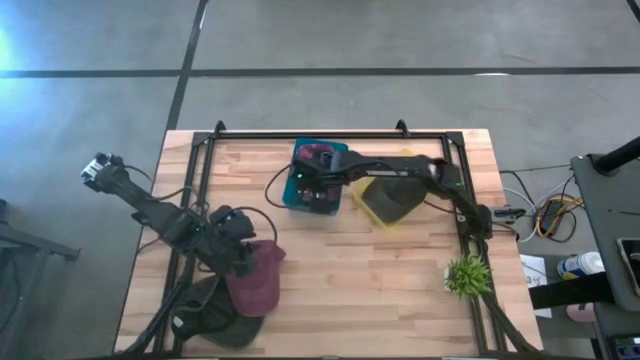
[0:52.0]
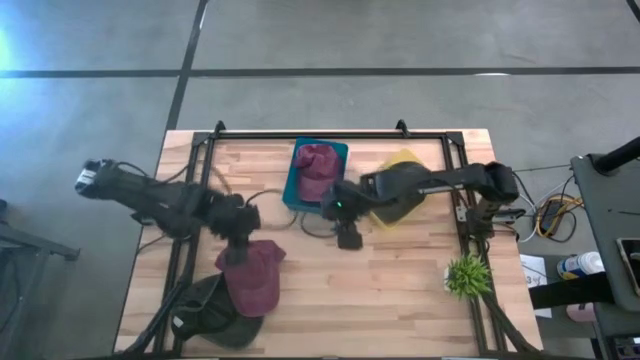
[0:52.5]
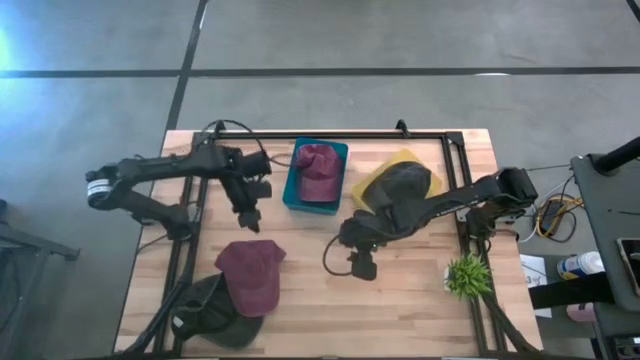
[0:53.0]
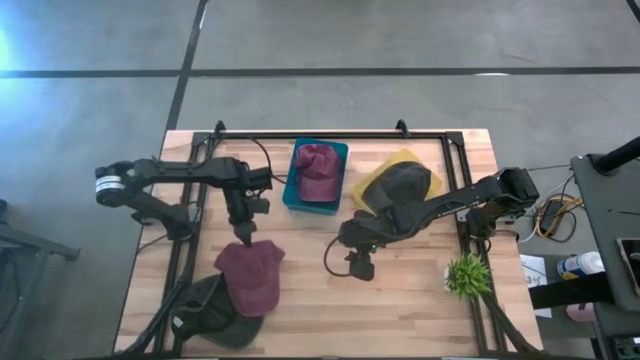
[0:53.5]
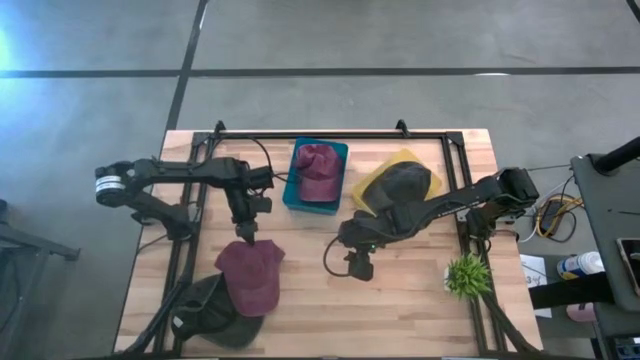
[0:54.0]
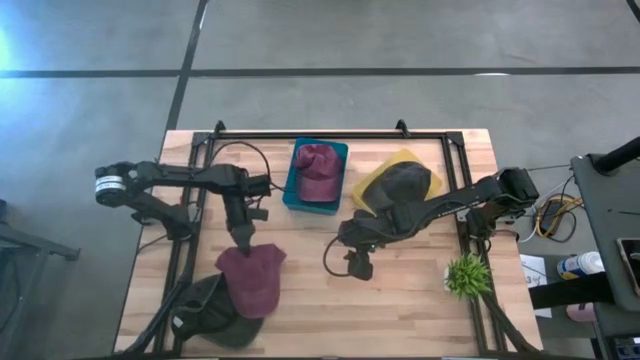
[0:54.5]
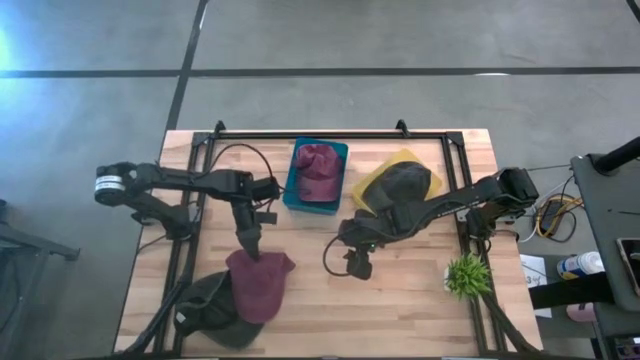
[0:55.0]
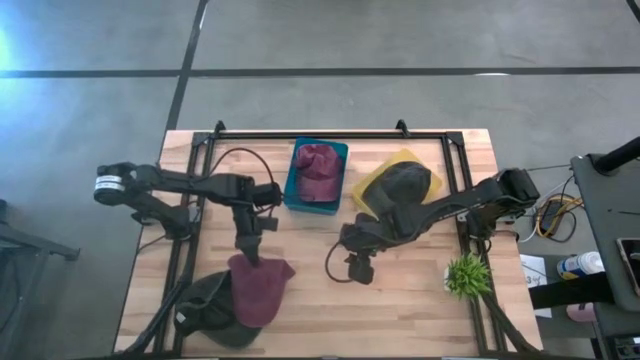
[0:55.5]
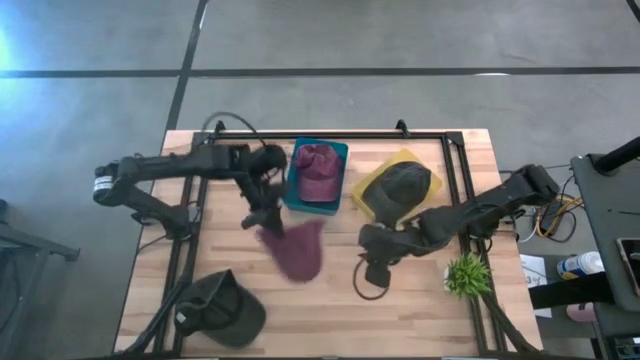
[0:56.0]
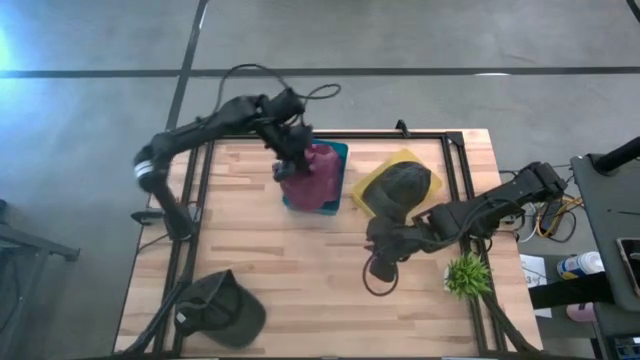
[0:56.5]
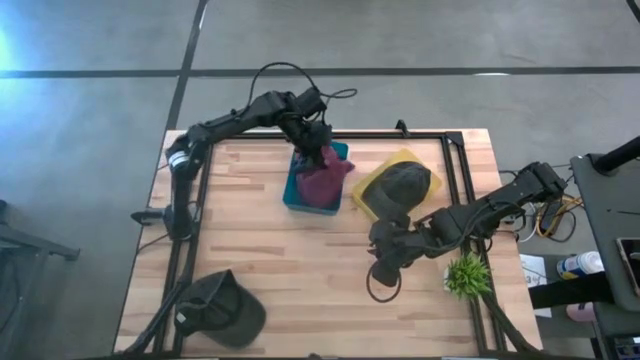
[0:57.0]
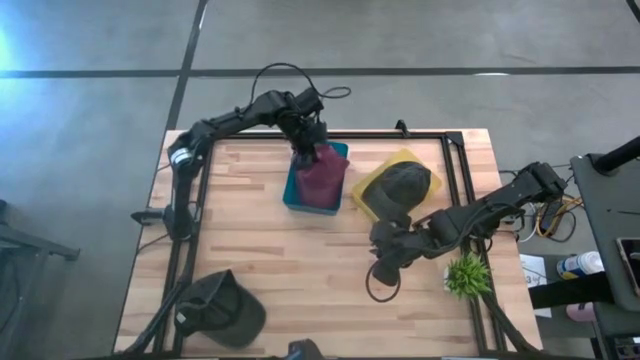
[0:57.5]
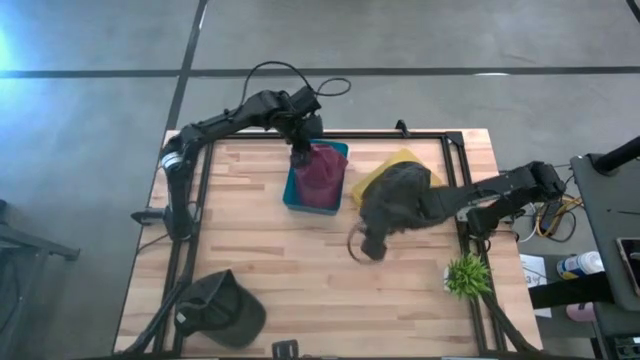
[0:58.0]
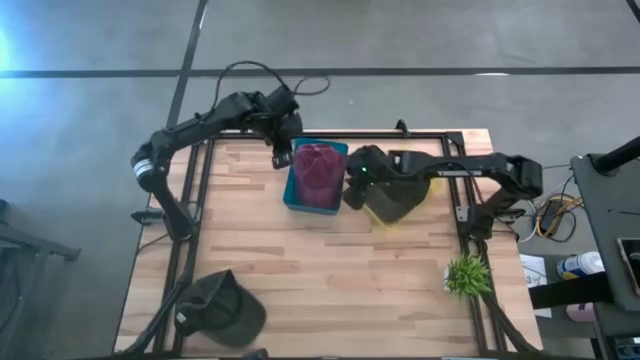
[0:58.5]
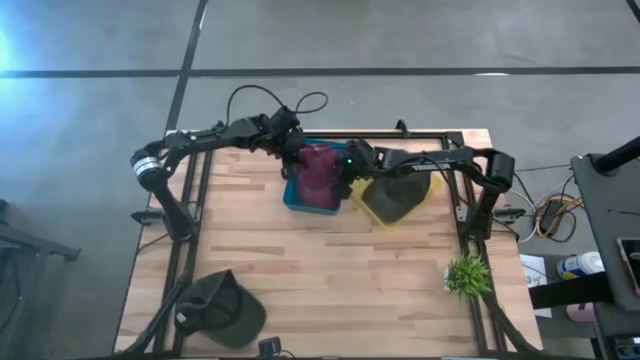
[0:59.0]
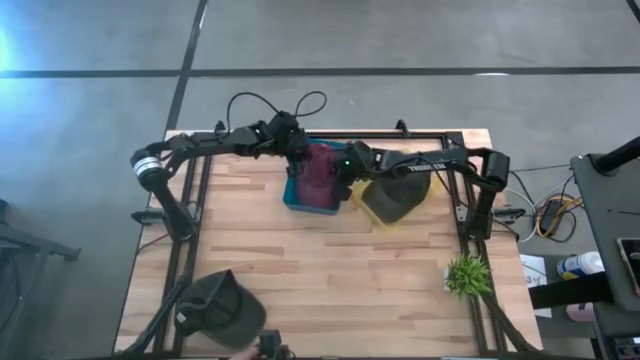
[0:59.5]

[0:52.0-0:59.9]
Task: Pick & Place hat
Put the red cap into the blue bin

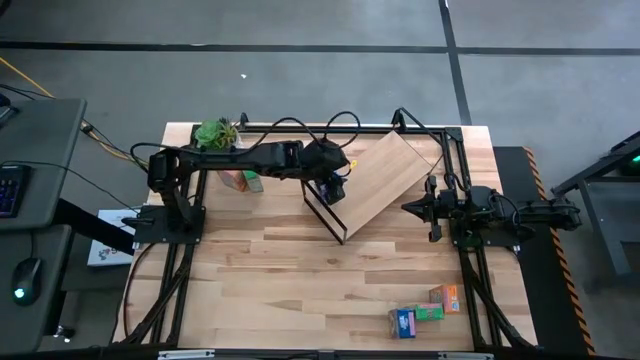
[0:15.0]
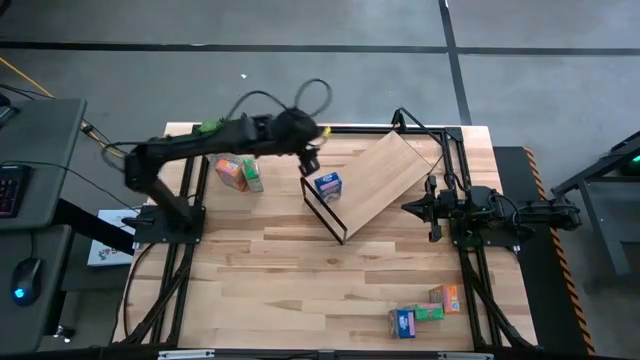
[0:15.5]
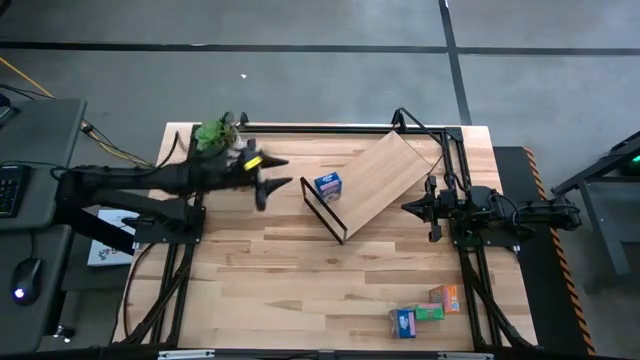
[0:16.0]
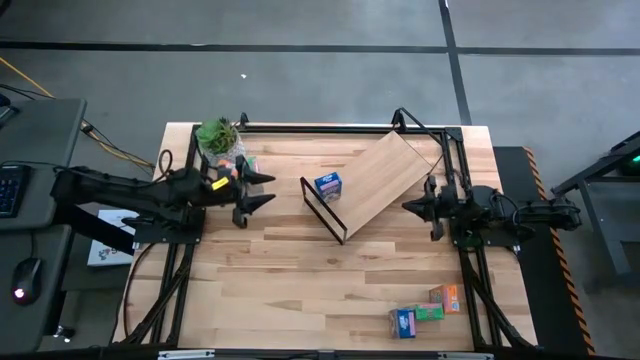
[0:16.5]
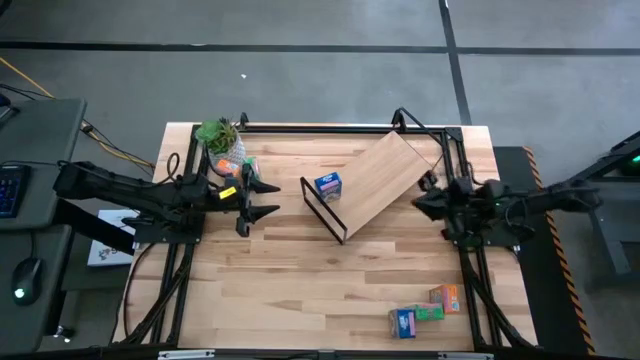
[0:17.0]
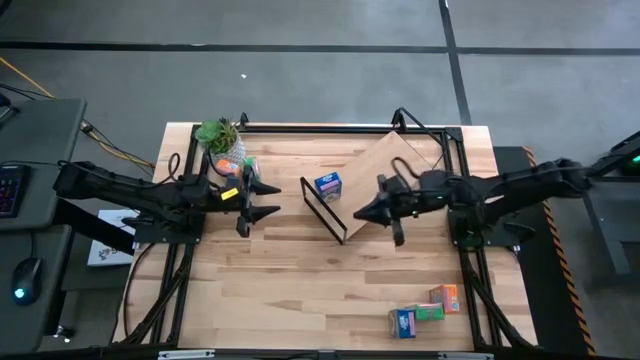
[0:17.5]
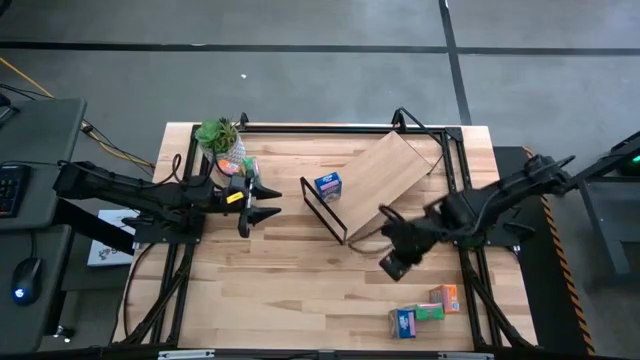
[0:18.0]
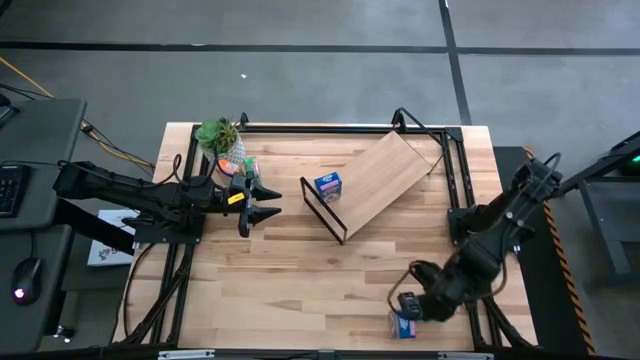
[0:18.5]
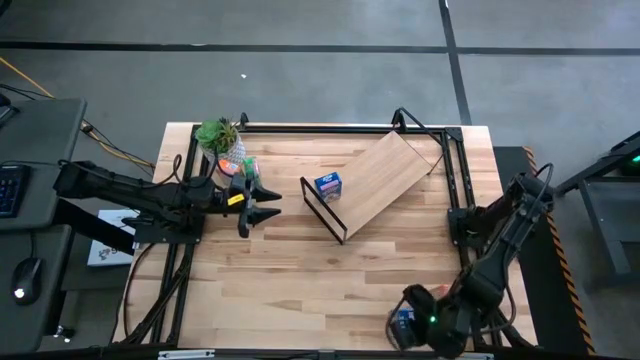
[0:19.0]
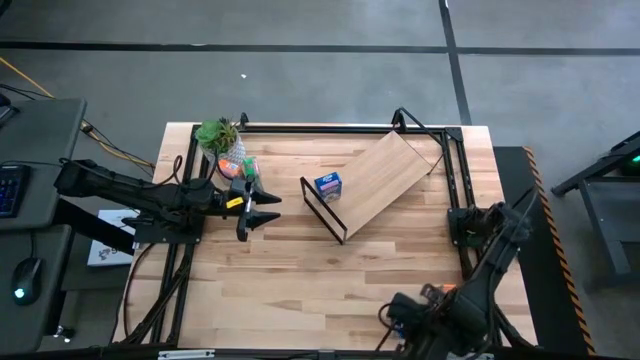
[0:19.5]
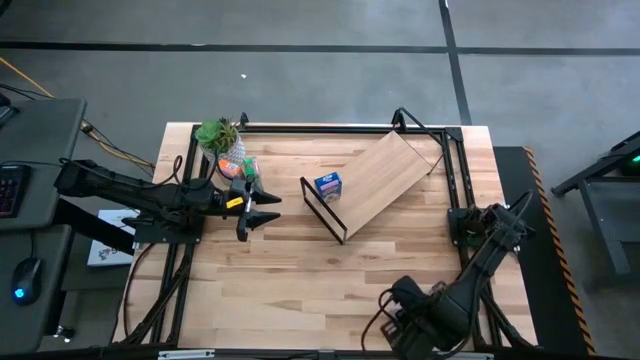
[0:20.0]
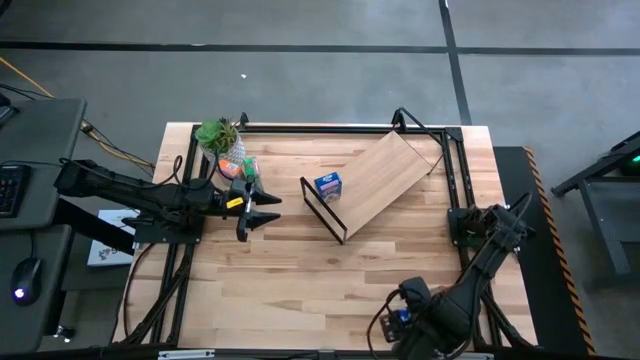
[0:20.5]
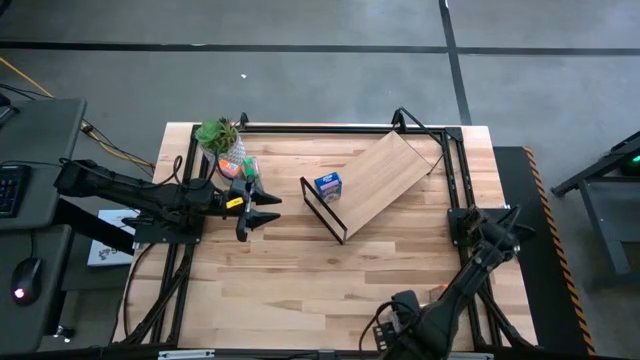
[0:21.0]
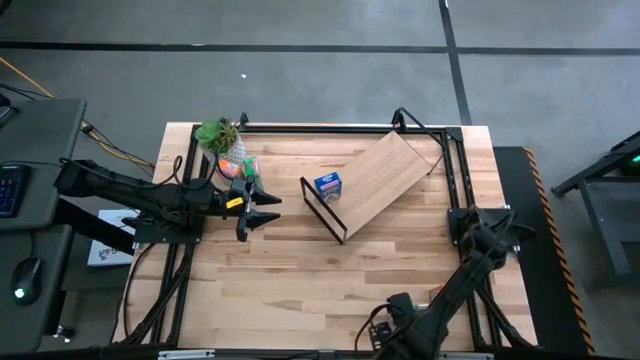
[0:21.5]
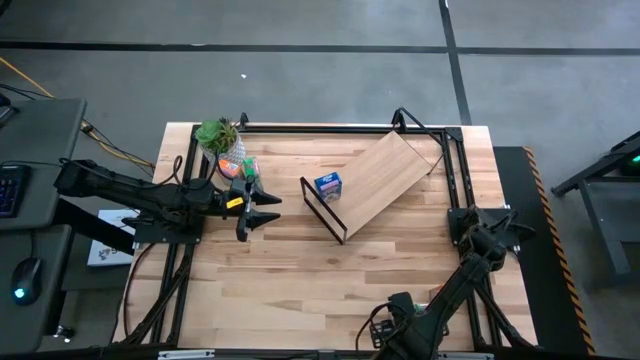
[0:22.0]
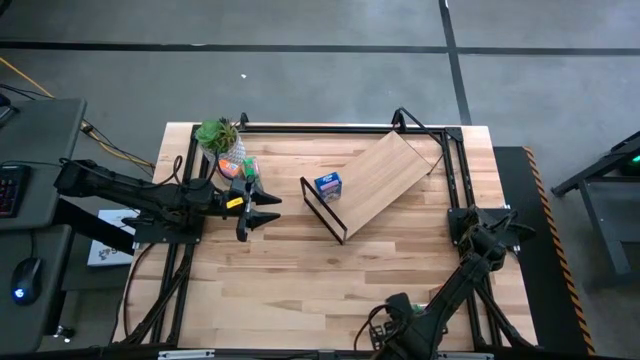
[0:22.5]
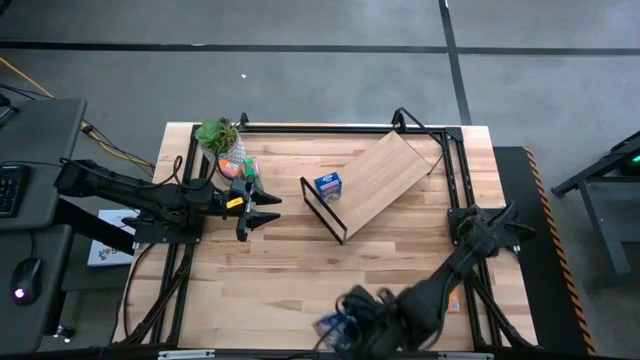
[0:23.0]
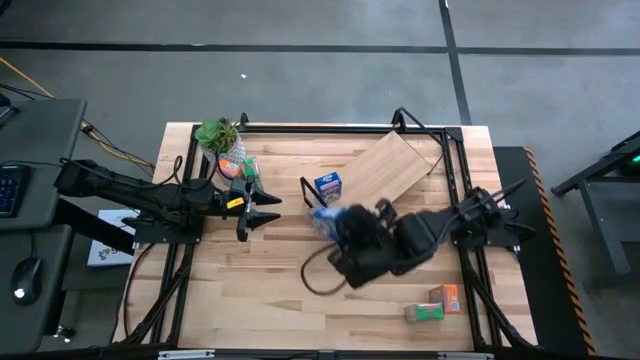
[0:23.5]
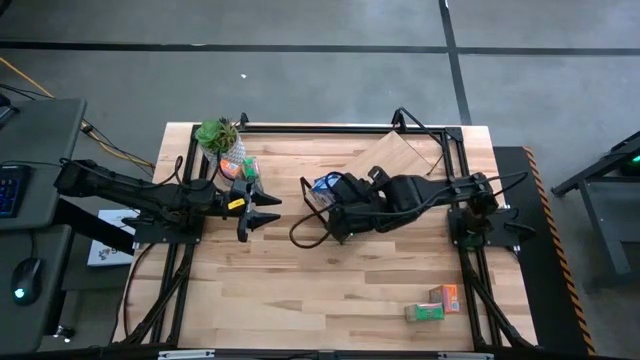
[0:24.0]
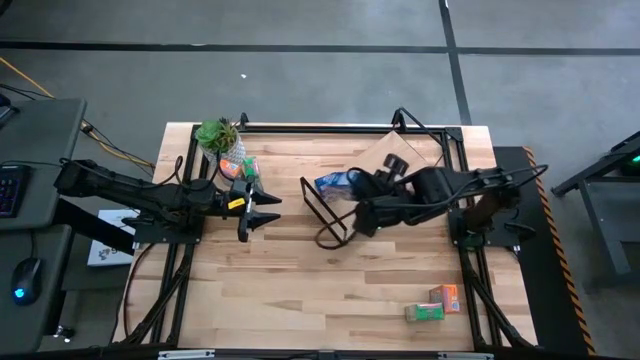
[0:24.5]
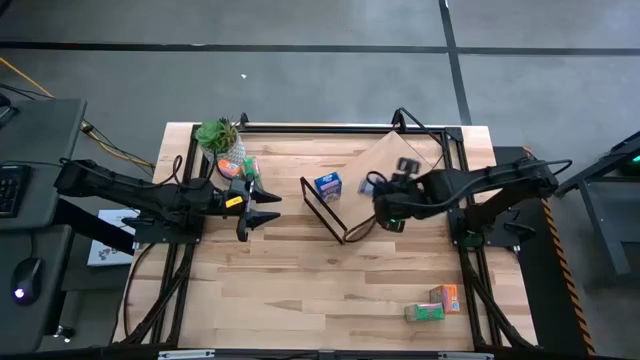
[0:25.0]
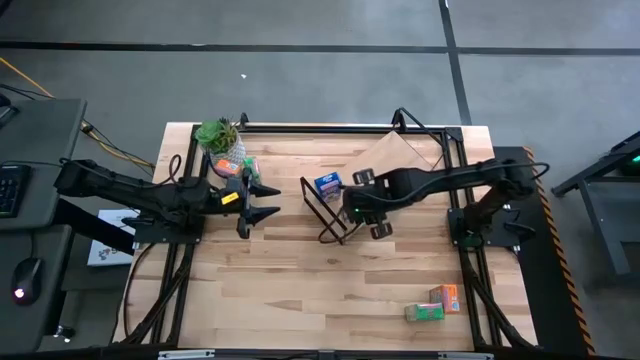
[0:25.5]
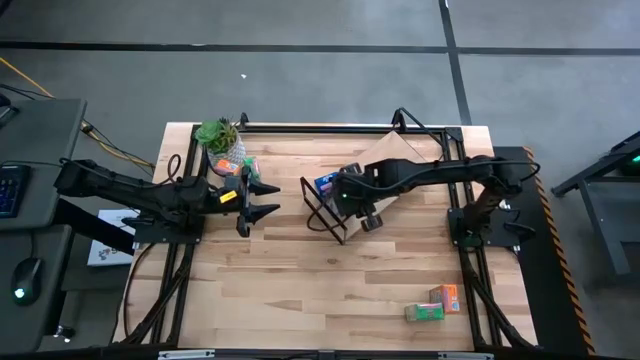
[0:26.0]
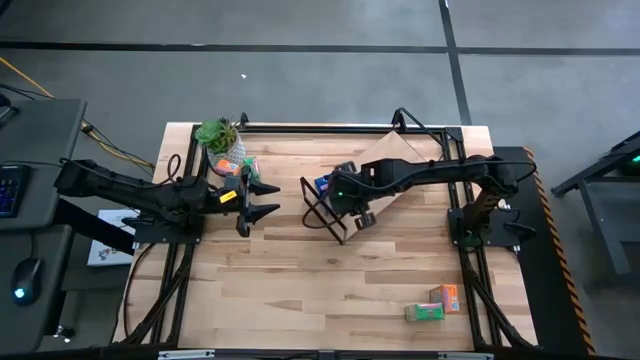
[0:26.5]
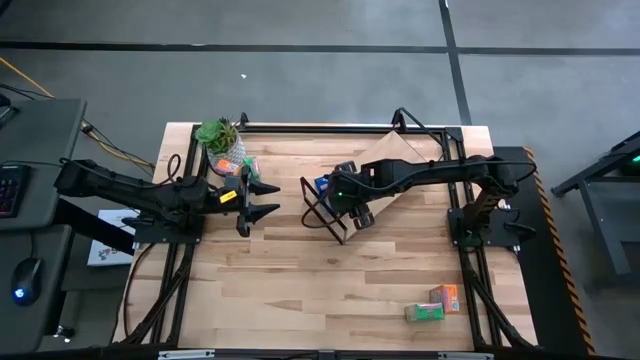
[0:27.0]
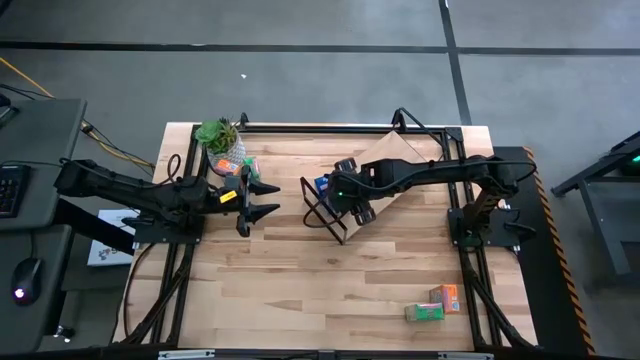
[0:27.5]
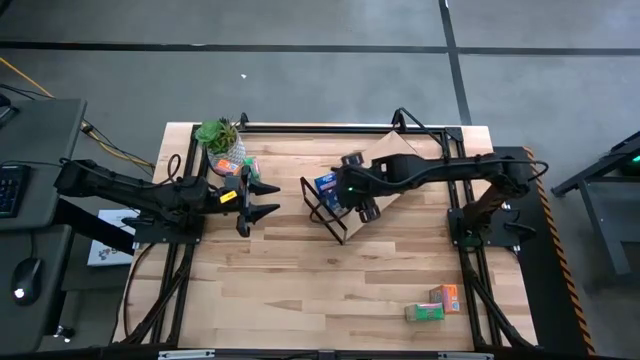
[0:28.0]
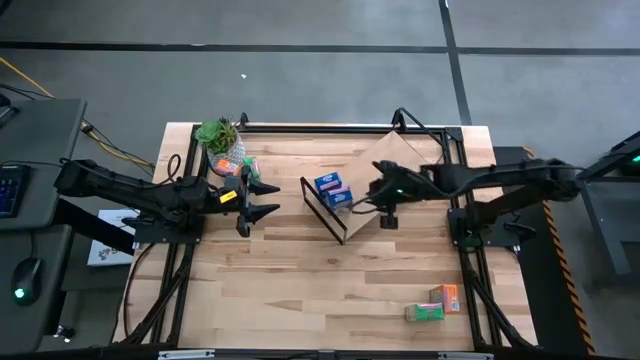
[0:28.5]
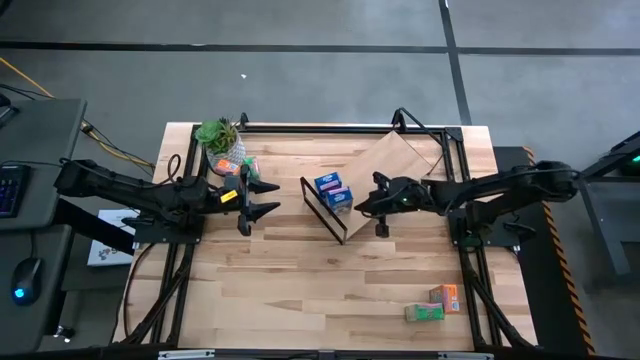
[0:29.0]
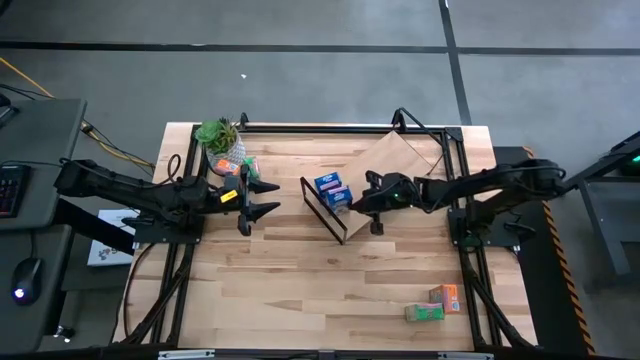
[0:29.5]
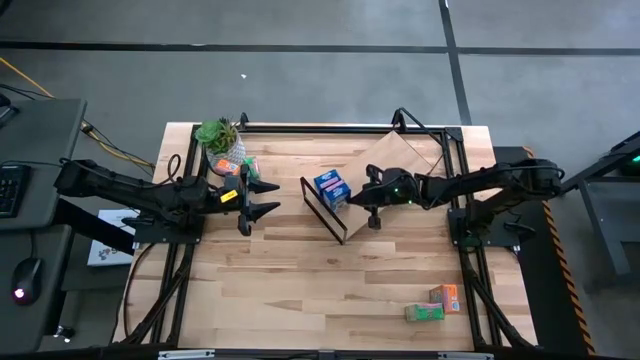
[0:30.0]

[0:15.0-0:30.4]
Task: Stack cereal on shelf
Put the blue cereal box aligned with the other blue cereal box on the shelf
